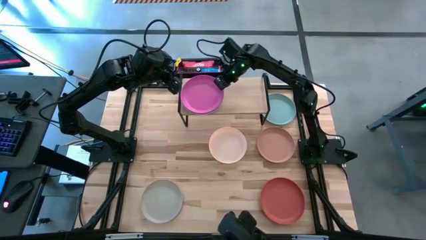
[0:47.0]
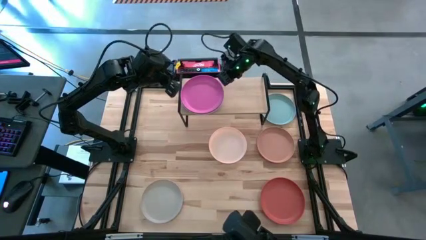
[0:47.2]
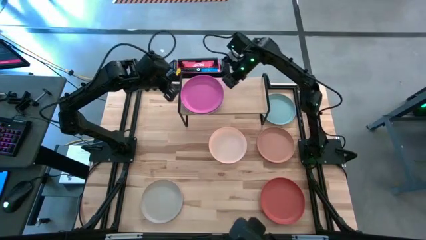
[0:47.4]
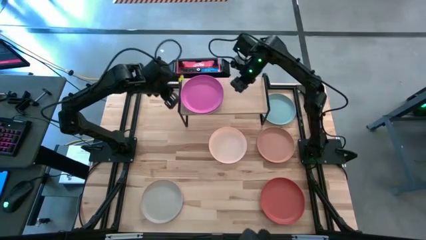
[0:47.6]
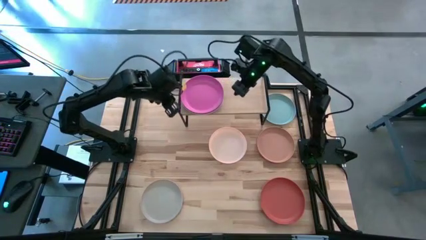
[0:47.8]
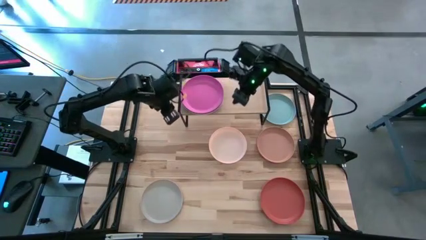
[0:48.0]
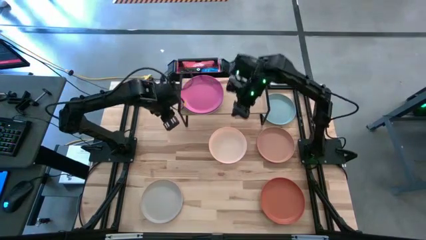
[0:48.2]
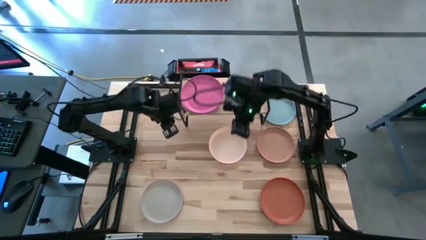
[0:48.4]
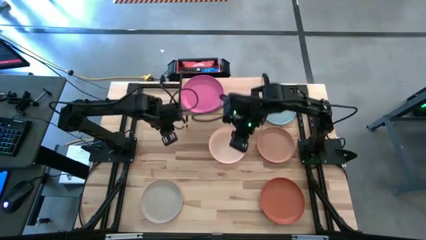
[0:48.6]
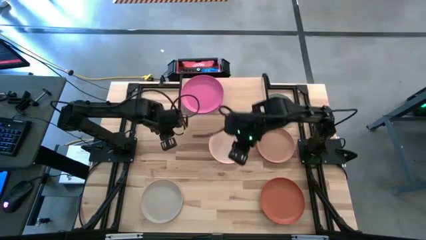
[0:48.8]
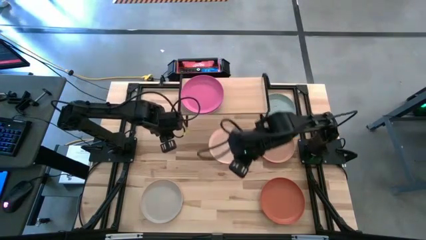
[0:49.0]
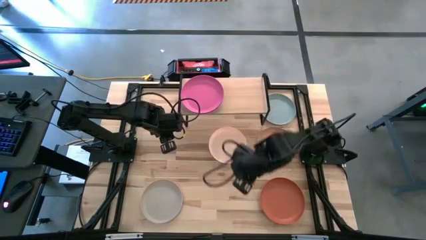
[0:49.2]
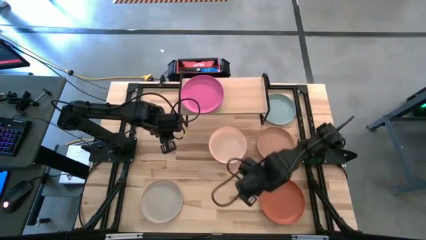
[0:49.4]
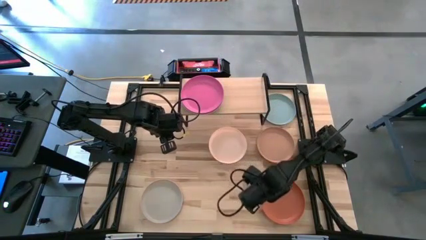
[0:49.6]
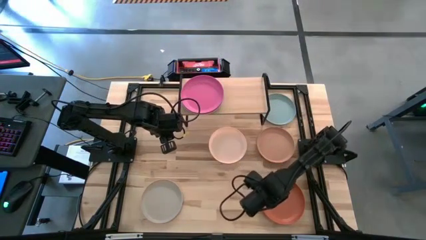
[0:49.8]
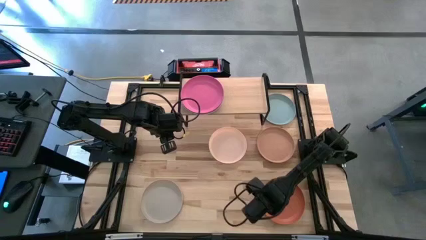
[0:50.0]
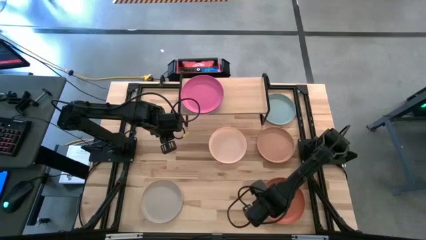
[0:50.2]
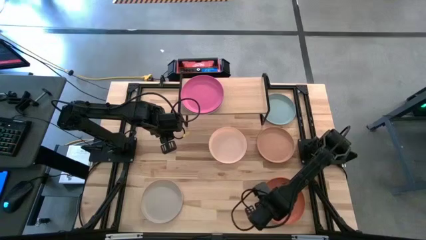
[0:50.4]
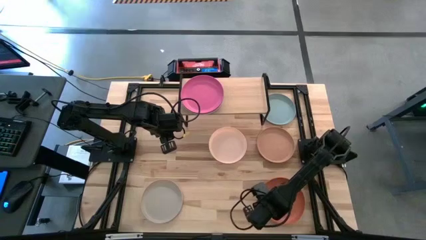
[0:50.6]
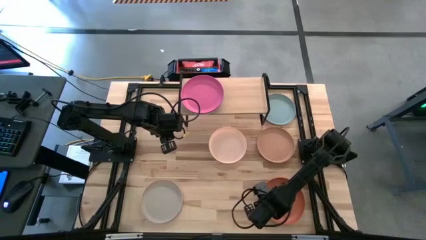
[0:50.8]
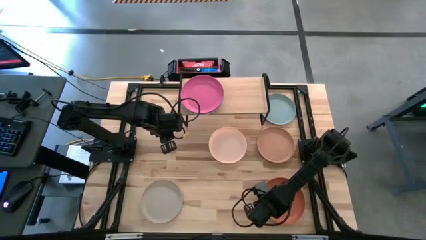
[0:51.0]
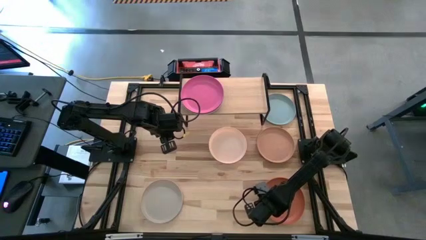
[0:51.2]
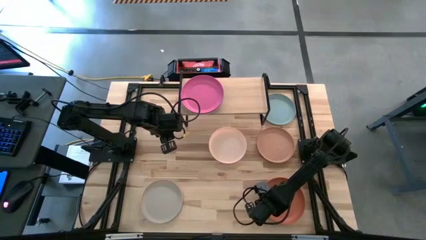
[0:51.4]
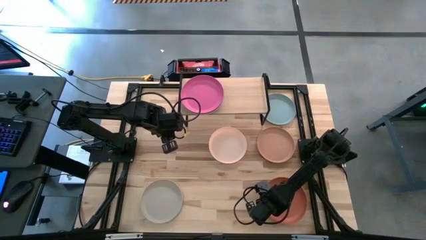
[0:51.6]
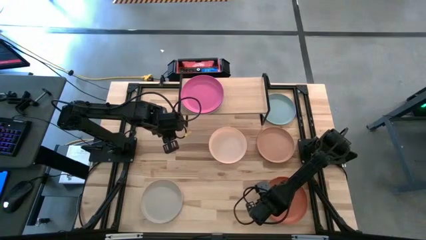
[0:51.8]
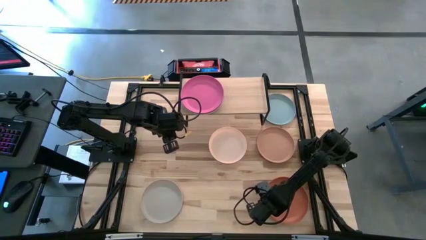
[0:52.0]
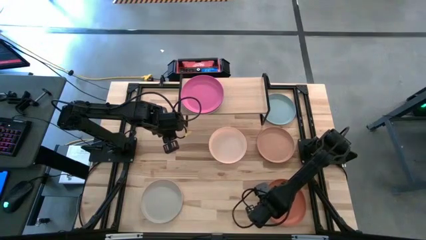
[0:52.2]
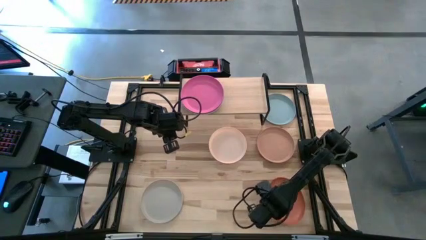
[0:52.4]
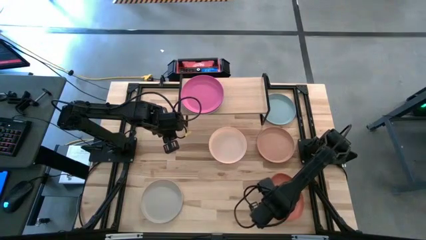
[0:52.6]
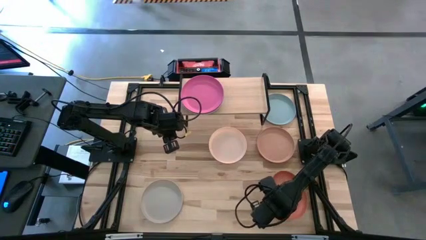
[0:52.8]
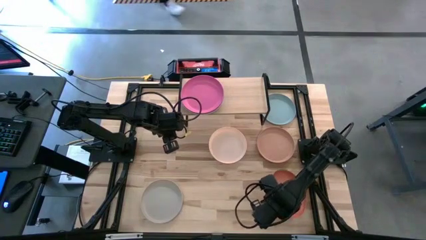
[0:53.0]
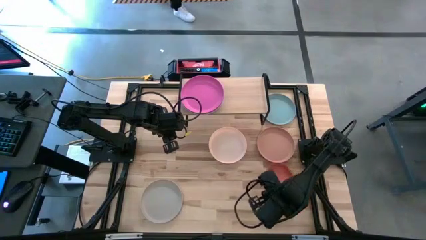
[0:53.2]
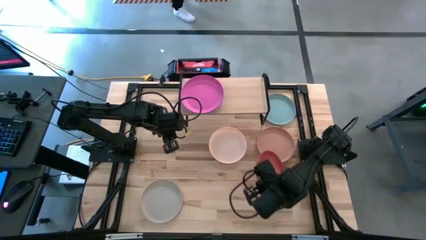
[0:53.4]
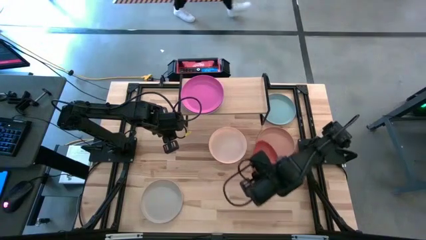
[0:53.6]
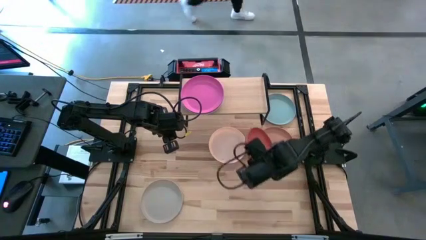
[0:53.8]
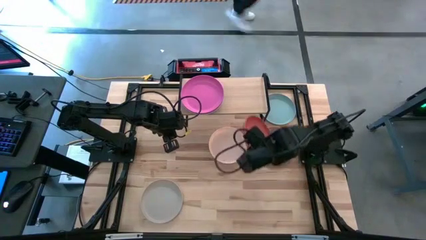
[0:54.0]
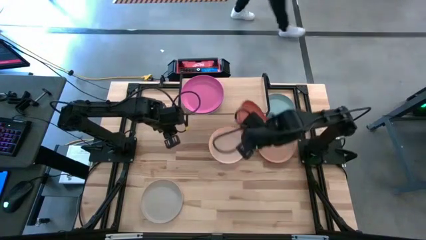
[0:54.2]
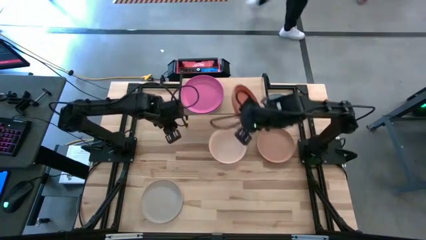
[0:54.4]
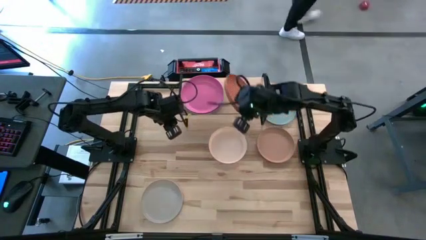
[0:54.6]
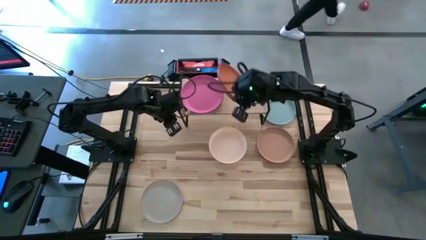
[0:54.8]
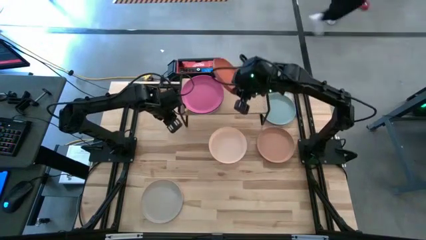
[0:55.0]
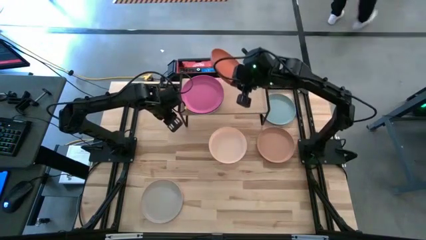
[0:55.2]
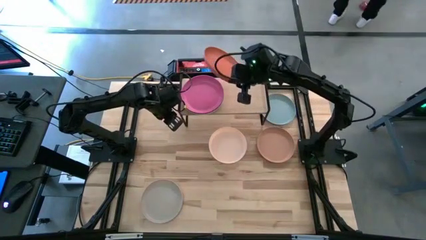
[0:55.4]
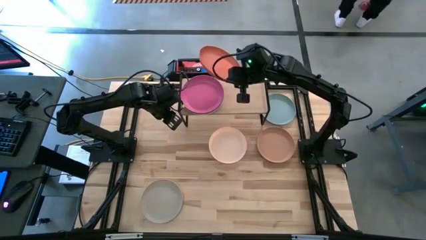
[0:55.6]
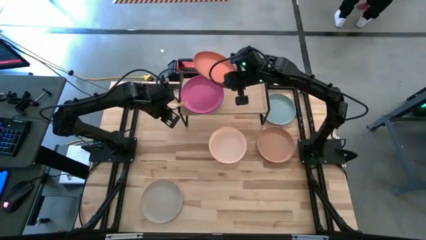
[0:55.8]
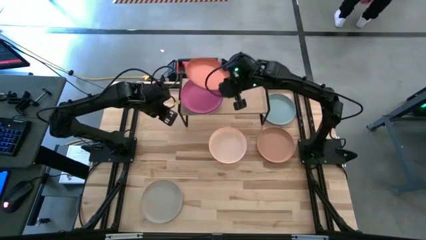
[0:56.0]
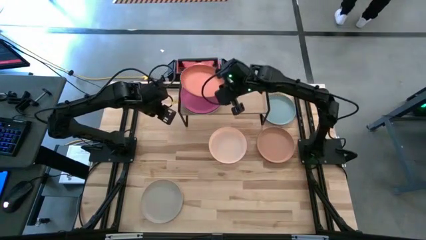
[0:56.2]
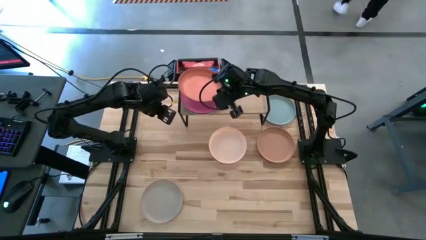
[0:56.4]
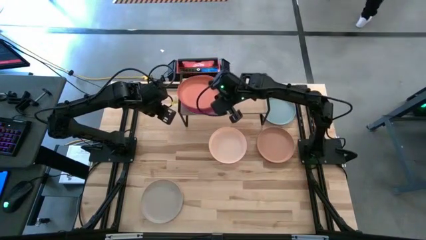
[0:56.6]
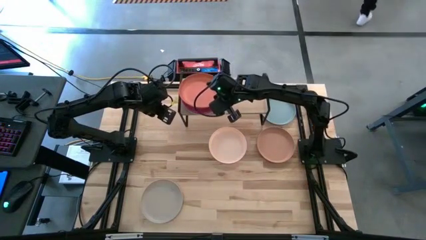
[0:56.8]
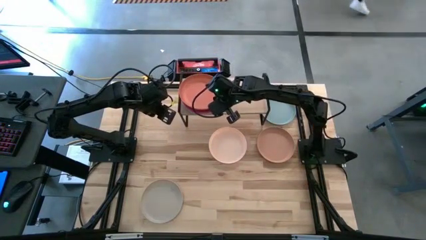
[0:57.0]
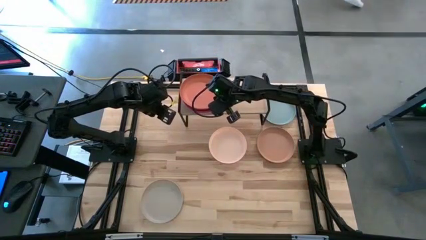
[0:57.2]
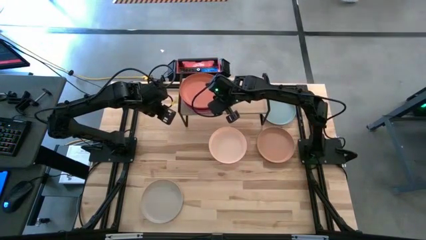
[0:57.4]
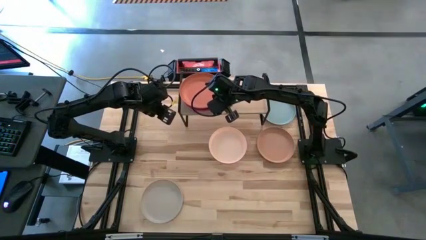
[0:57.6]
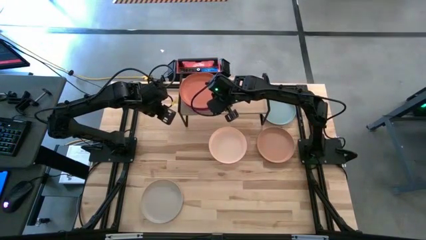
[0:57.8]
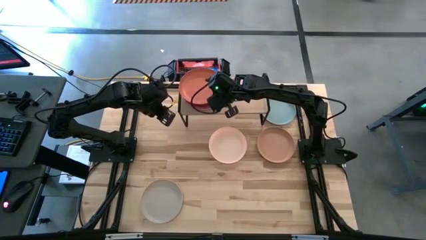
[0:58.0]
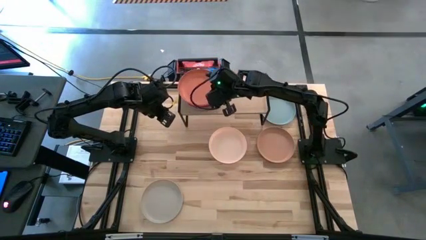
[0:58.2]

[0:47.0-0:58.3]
Task: Place and stack plates onto a shelf
Stack the orange plate on top of the pink plate on the shelf
